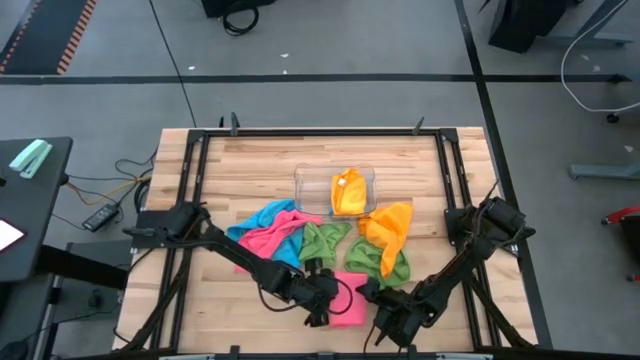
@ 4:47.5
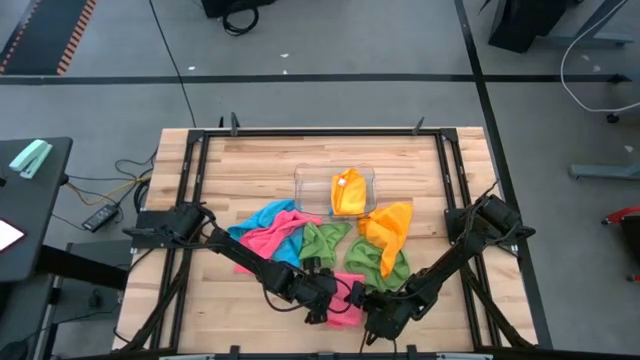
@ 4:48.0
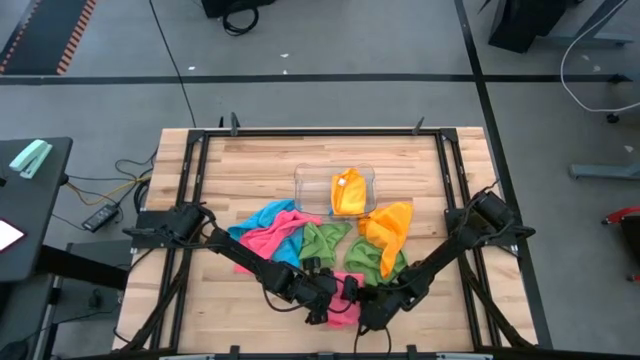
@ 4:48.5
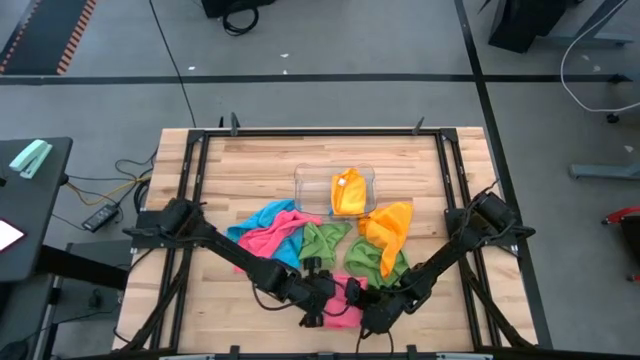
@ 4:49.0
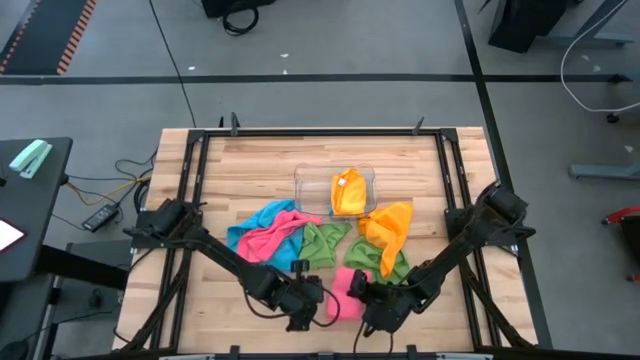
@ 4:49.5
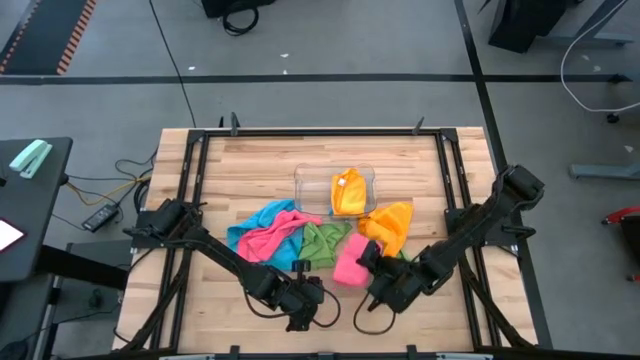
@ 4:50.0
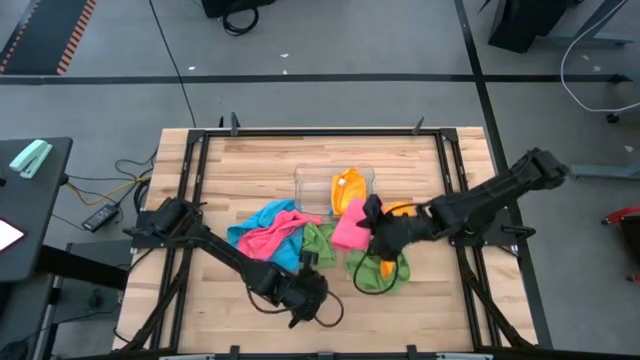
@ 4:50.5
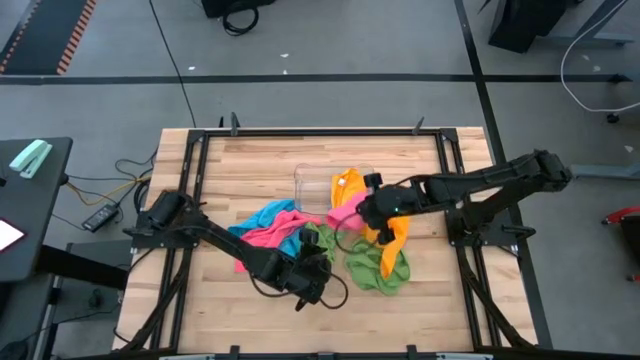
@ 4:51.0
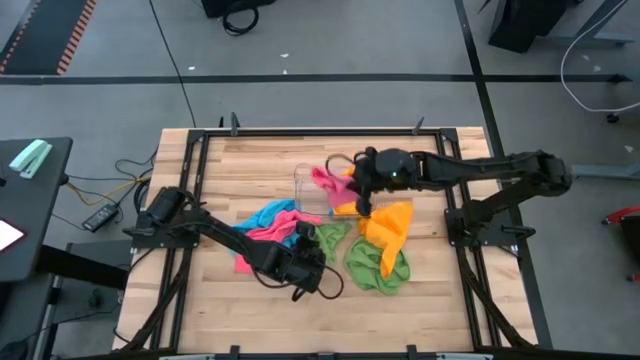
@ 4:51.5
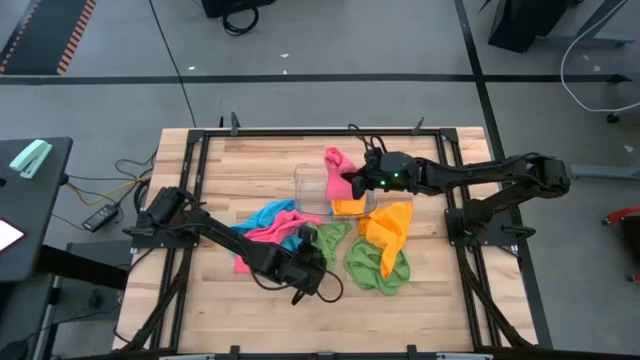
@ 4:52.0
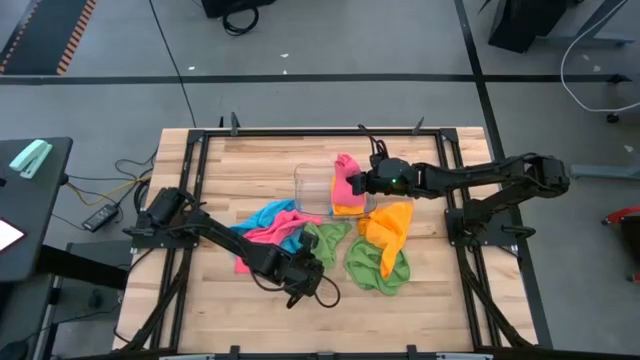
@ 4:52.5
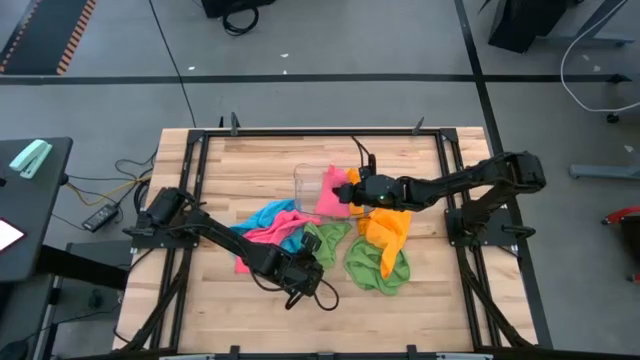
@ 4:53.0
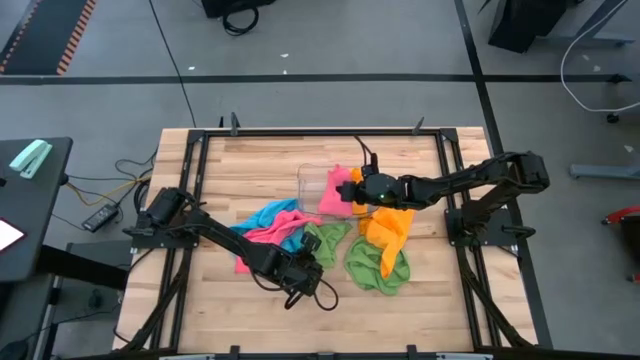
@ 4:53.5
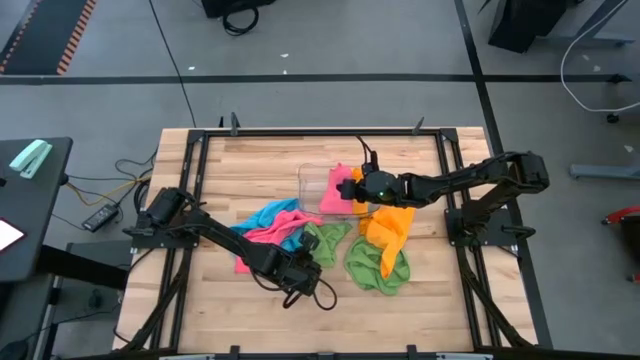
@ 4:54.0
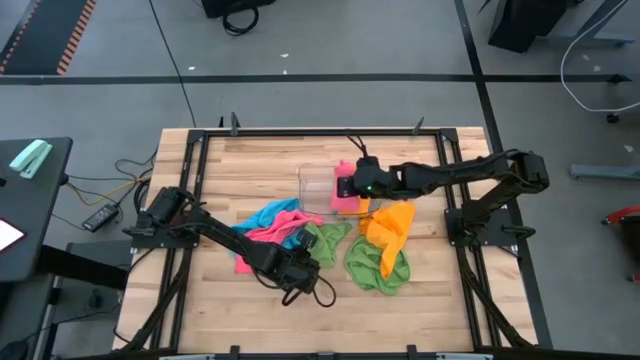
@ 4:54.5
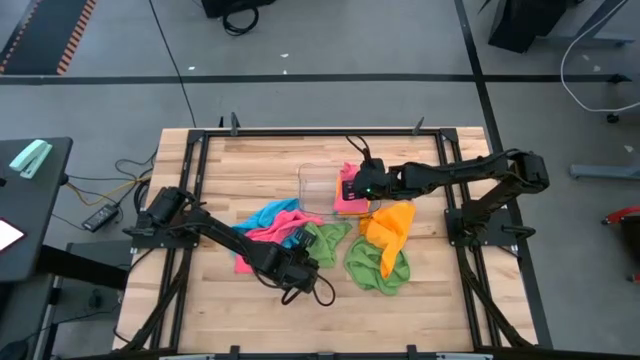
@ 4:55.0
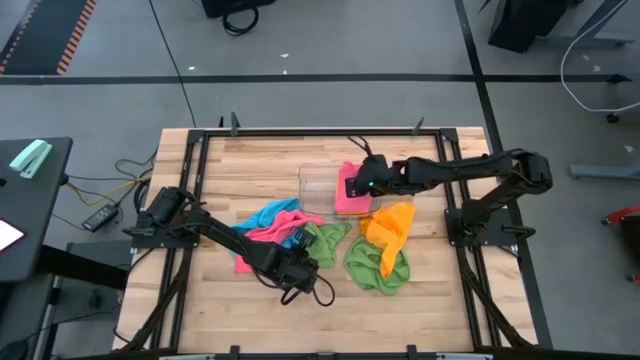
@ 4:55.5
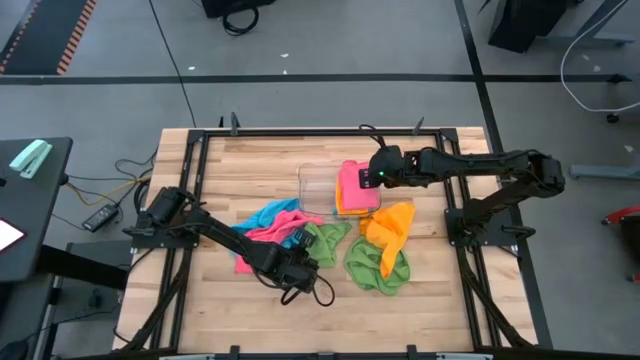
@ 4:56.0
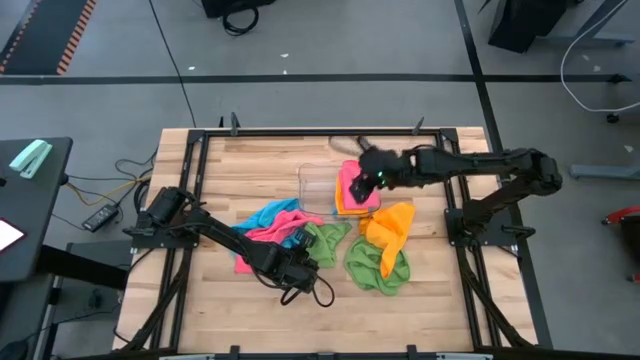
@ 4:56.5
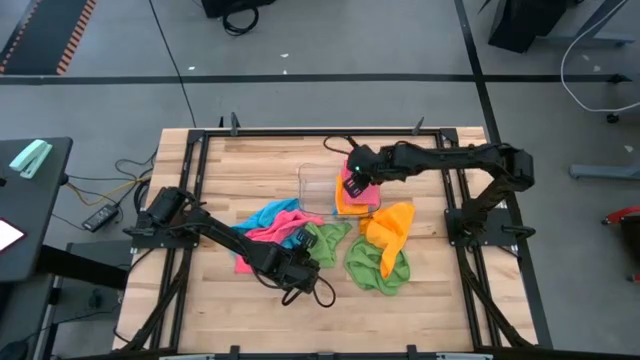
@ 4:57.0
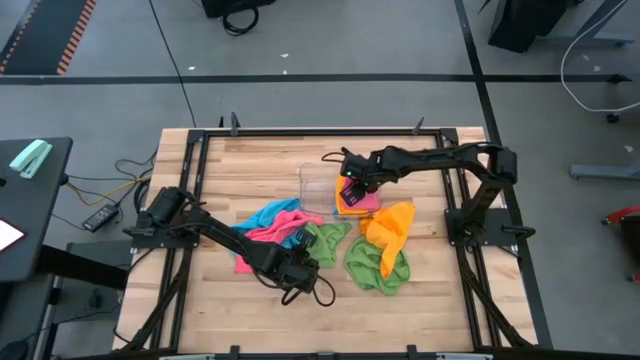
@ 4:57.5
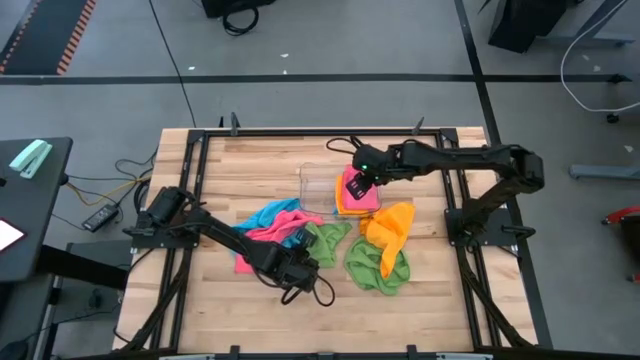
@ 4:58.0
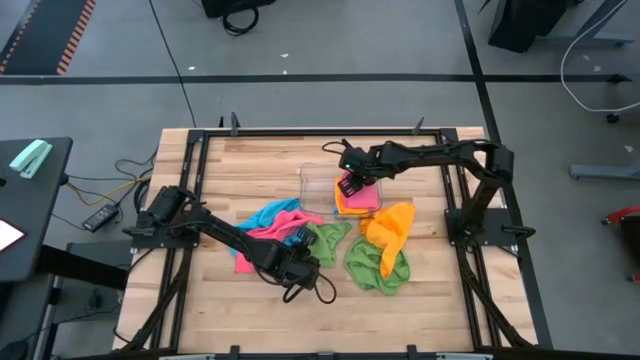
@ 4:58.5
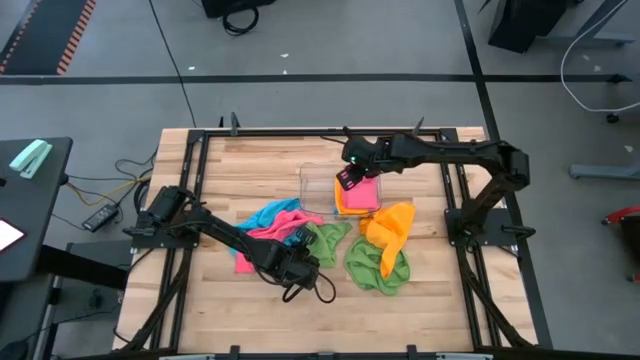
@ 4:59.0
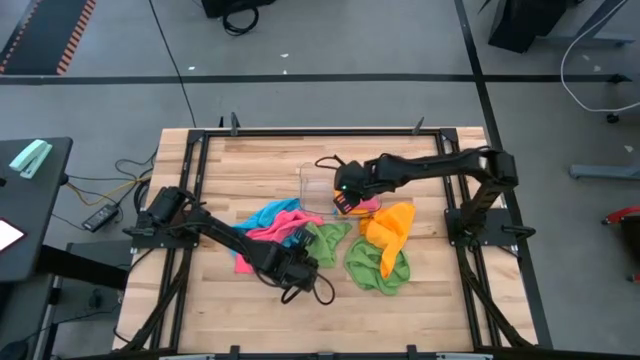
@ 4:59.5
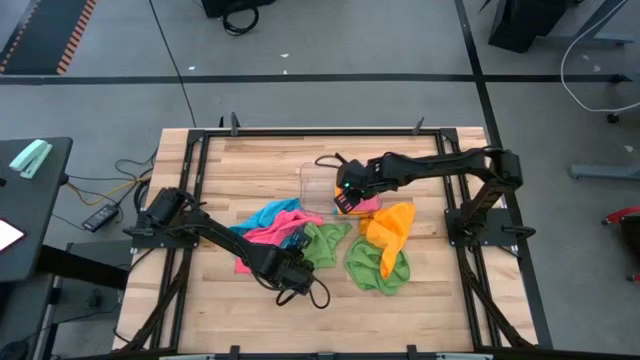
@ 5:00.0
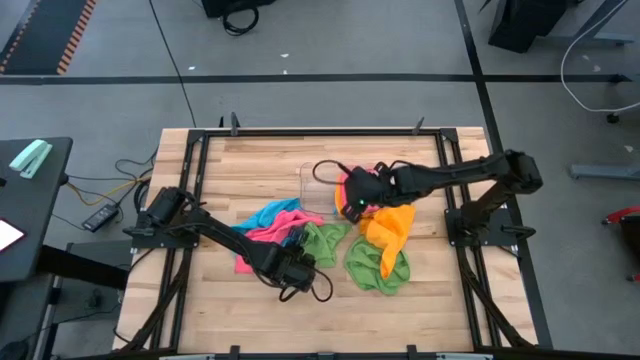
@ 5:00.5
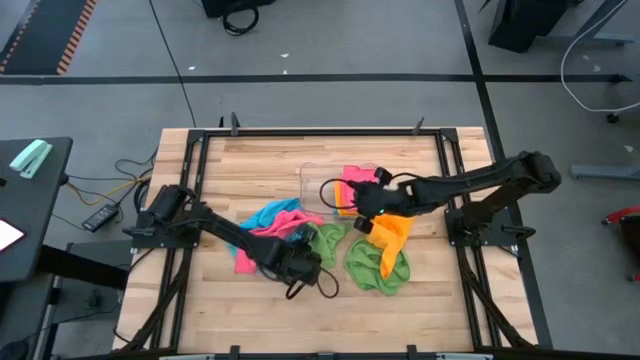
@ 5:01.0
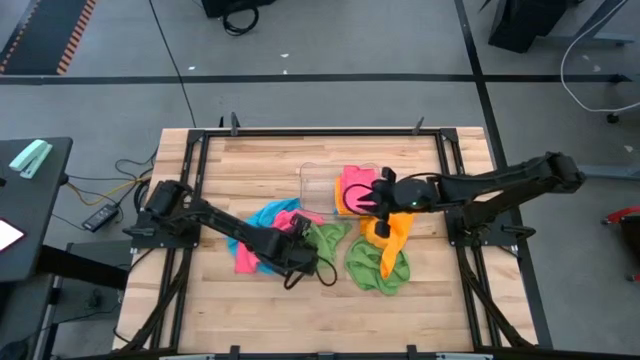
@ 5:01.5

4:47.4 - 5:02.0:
Task: Fold microfiber towels
Put the folded pink microfiber cloth into the transparent bin

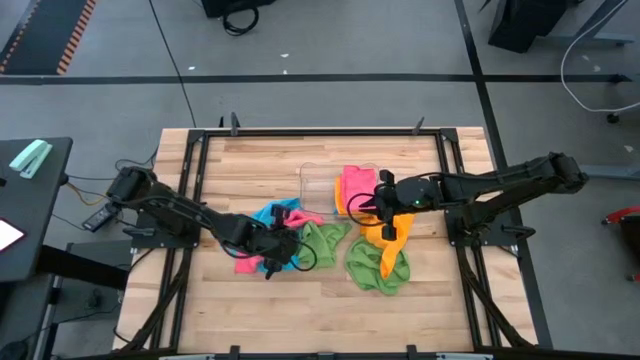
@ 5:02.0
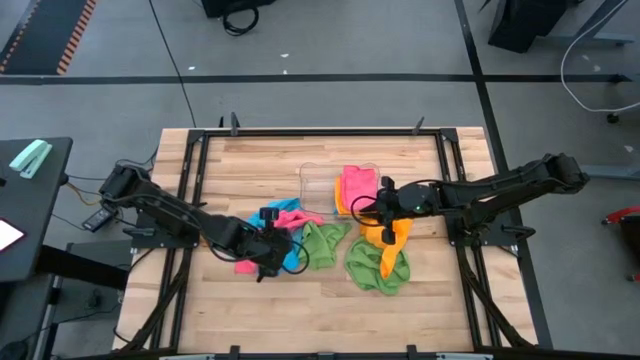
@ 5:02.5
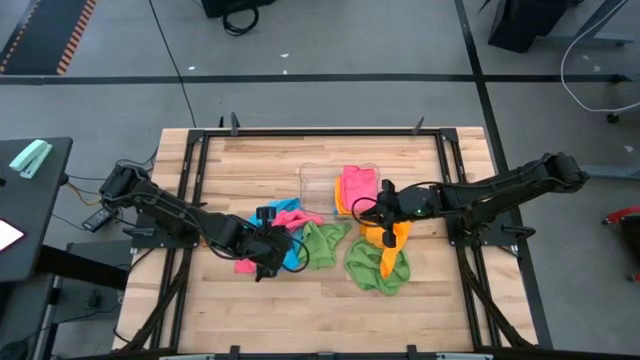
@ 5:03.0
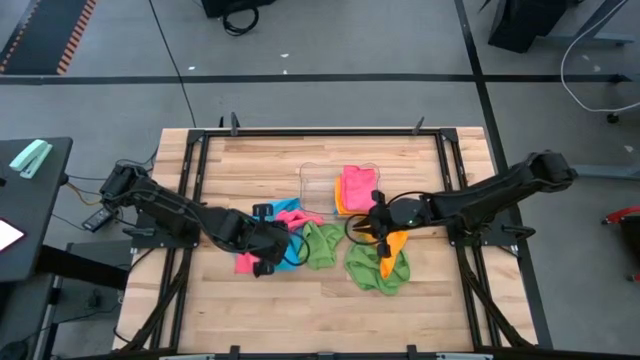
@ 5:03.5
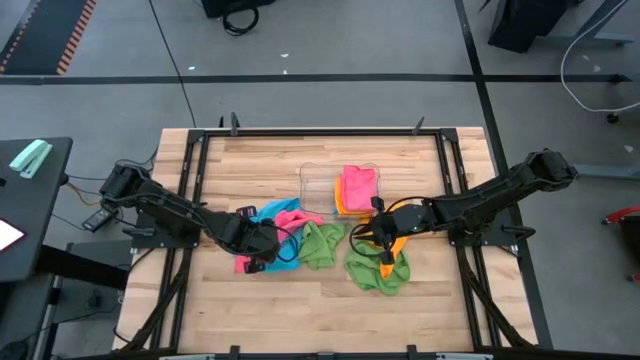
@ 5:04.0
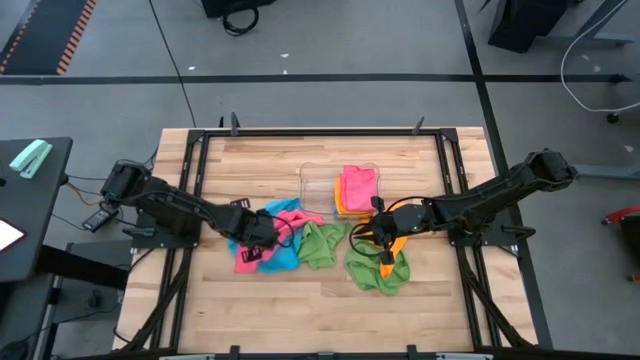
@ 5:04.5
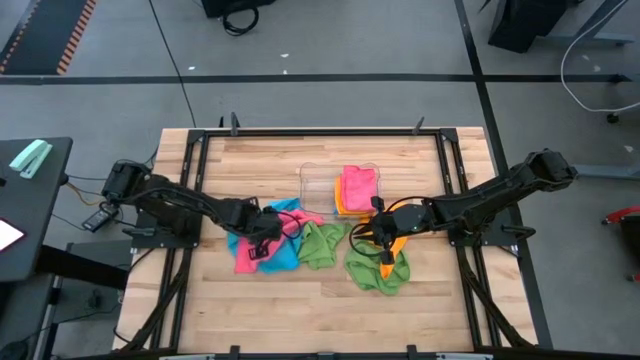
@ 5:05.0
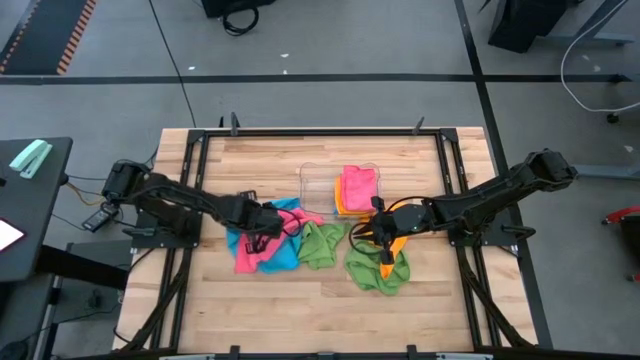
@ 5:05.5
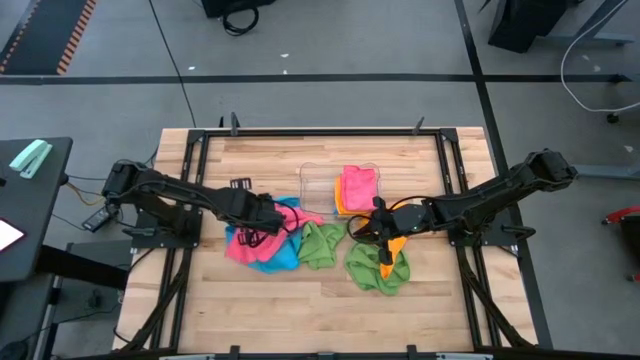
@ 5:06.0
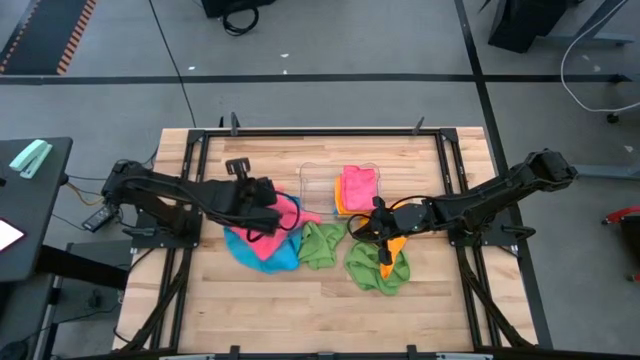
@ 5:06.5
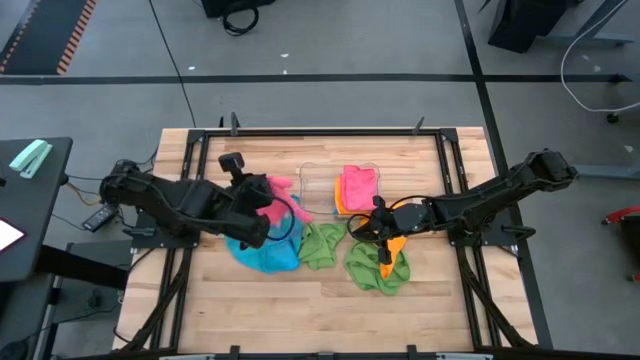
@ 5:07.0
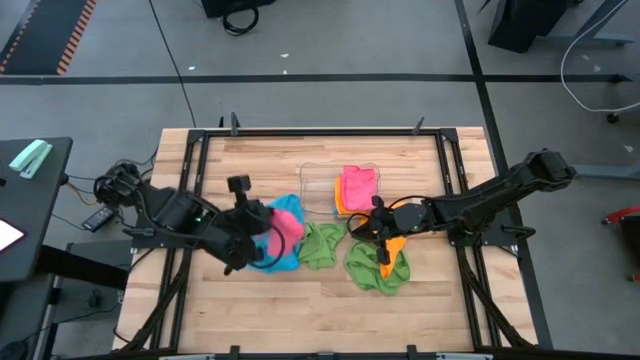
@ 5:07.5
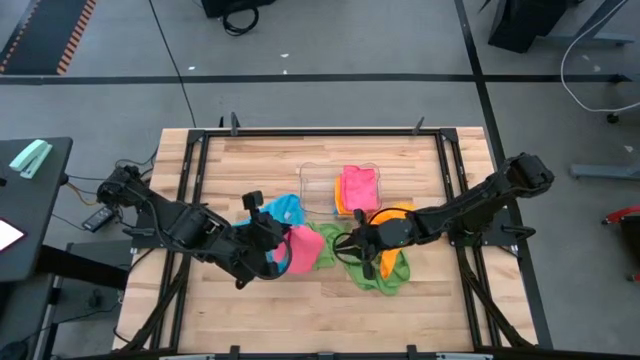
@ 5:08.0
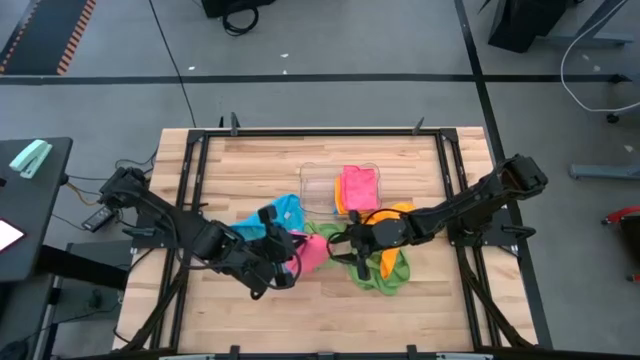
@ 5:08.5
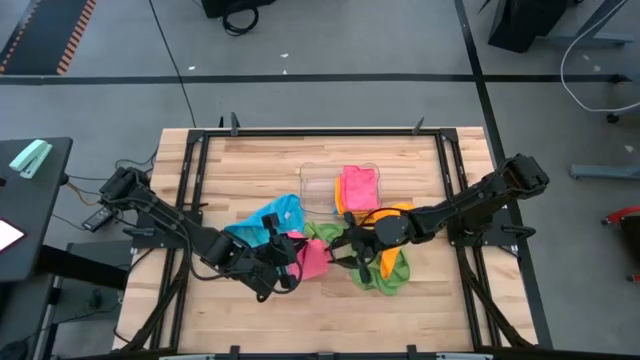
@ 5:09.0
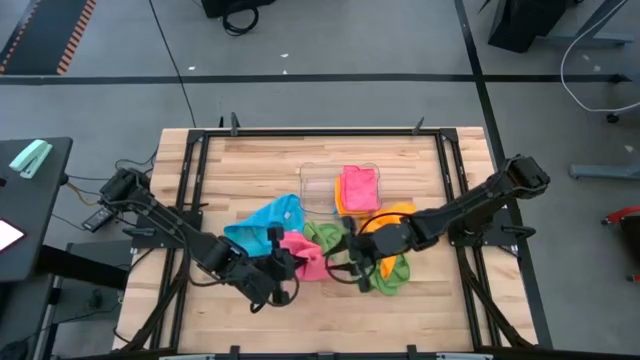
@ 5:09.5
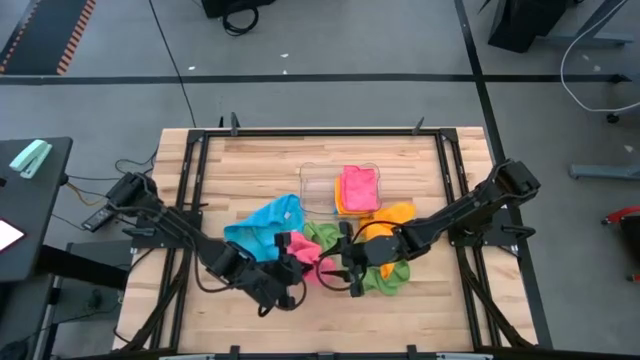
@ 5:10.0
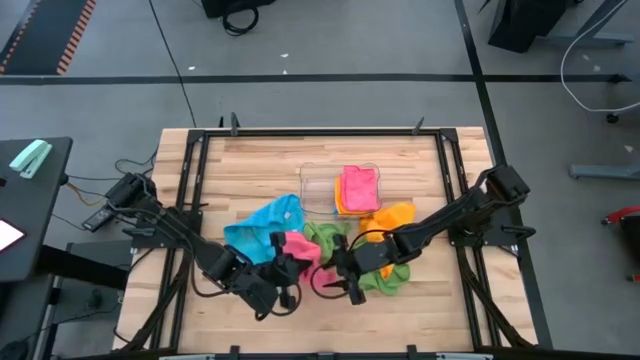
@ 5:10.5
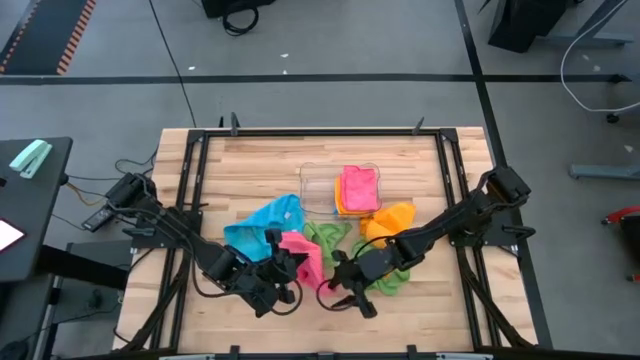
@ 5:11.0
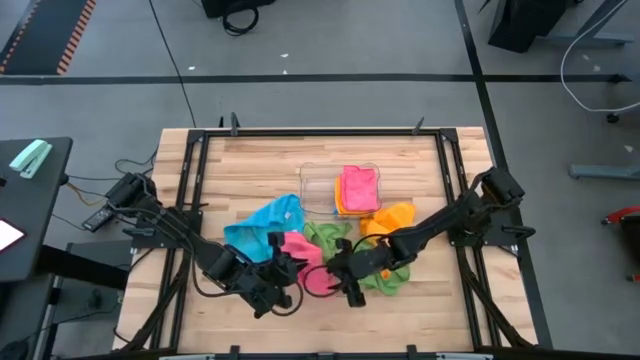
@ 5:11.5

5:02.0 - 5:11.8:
Fold the pink microfiber cloth
